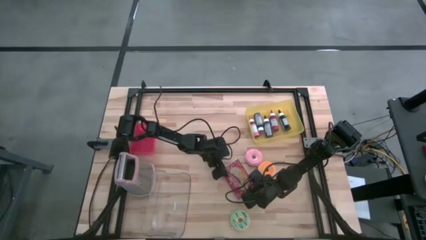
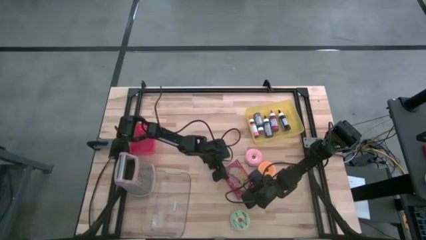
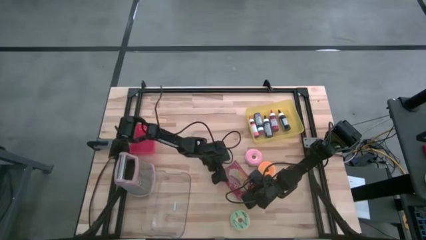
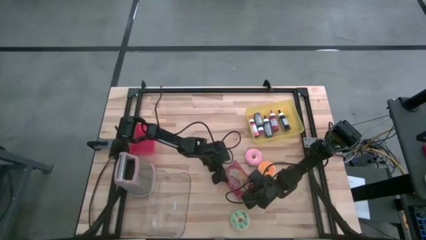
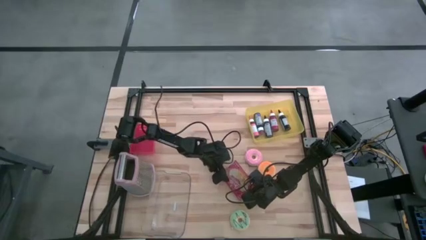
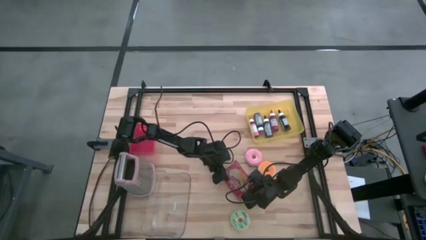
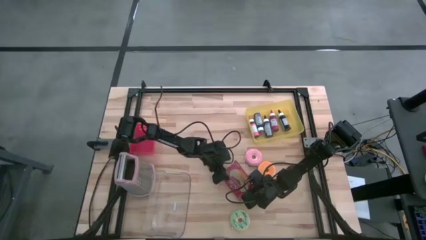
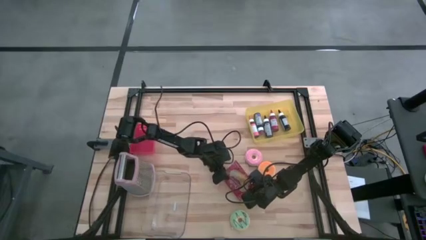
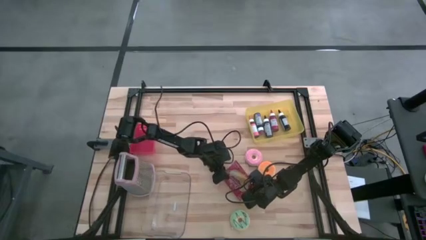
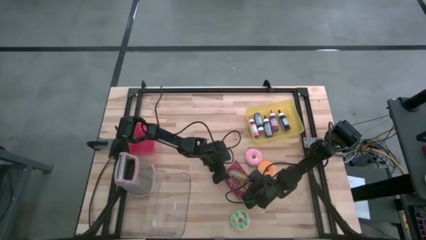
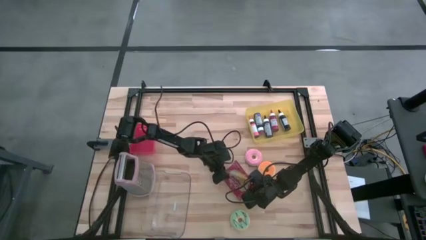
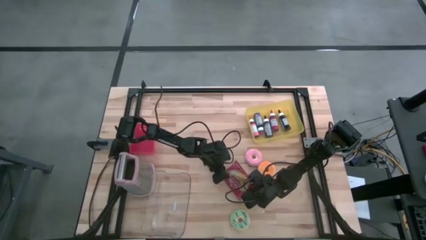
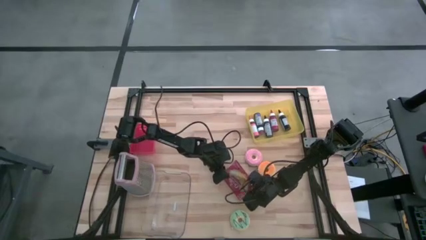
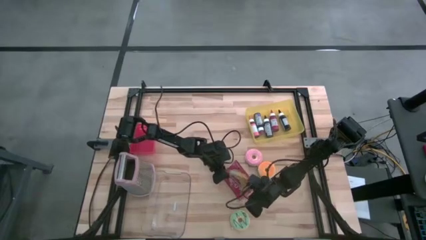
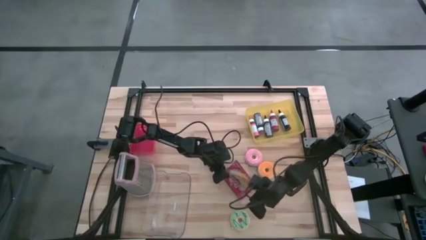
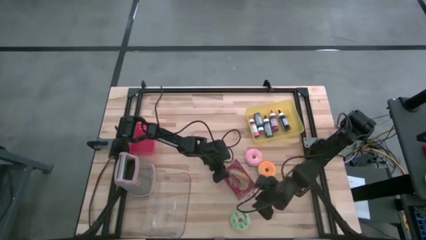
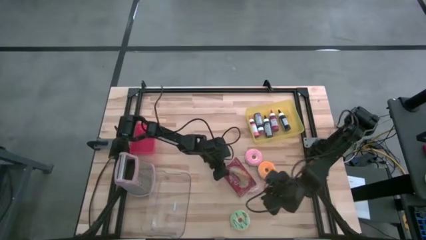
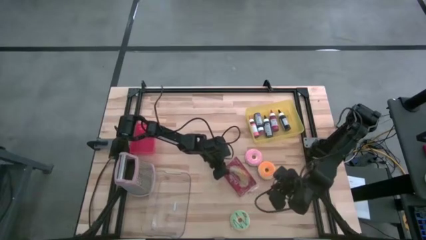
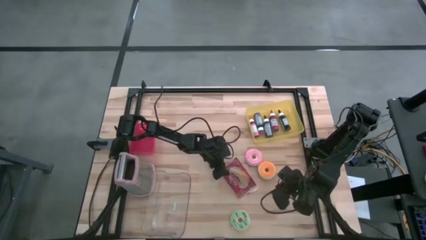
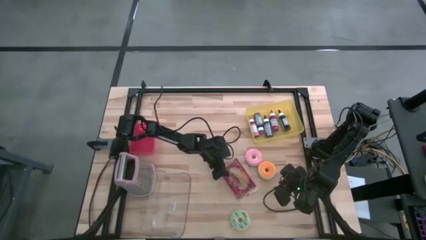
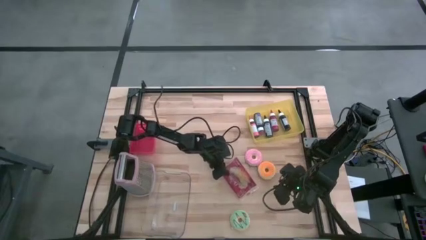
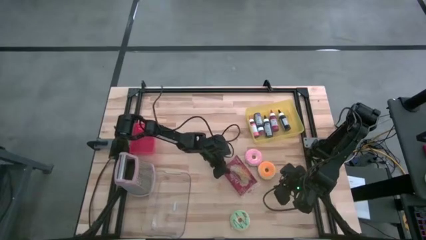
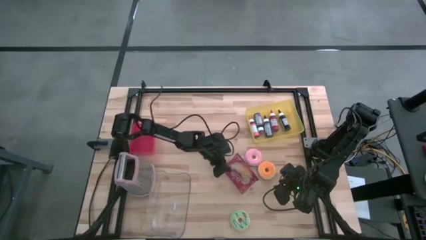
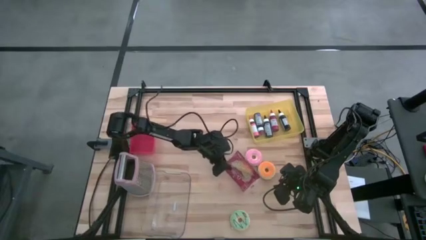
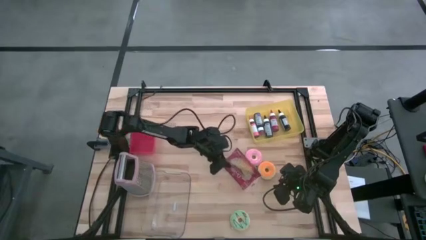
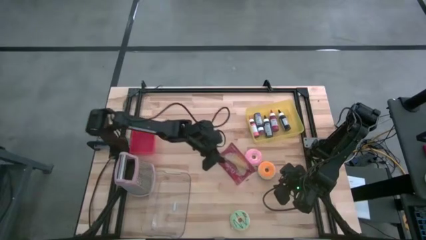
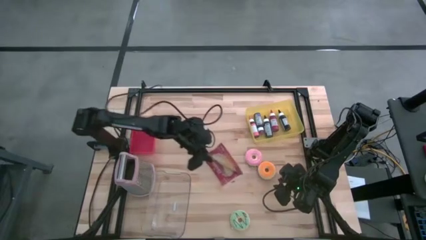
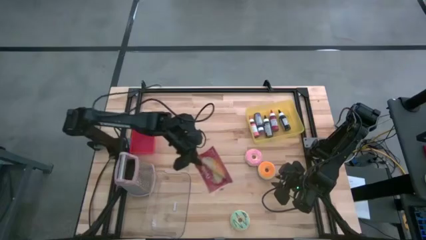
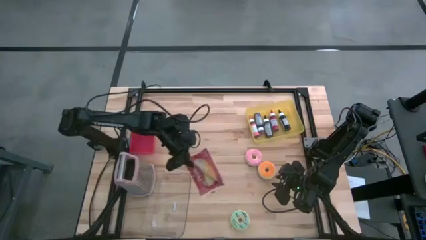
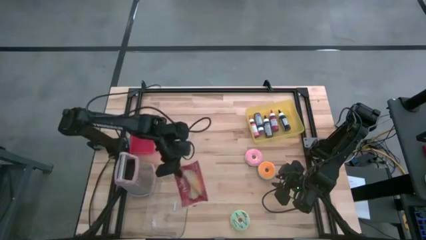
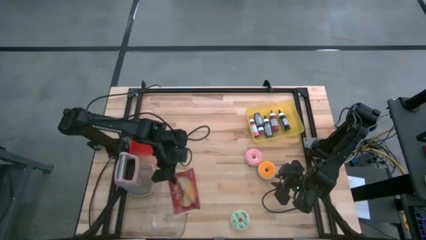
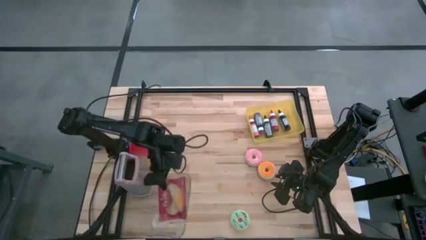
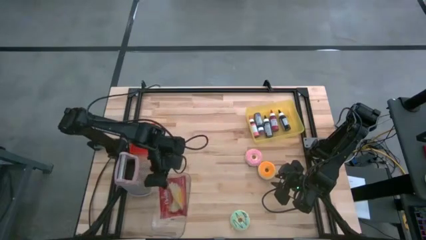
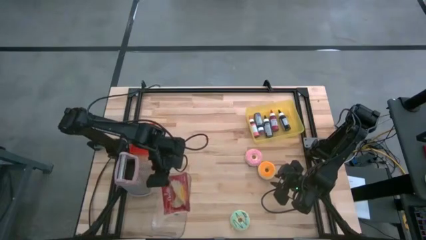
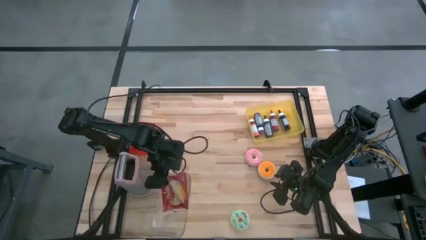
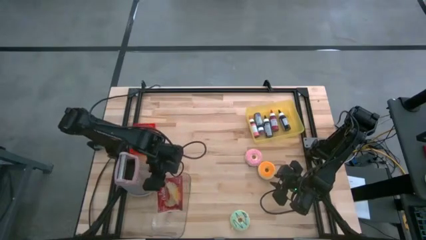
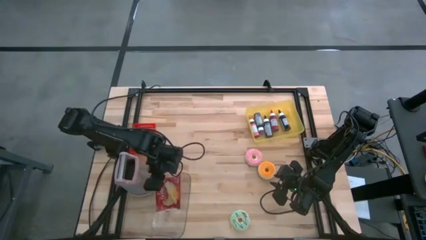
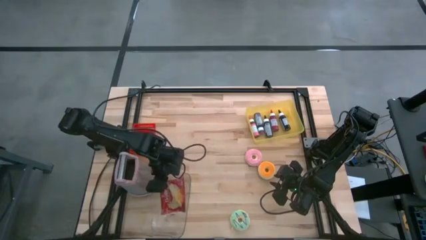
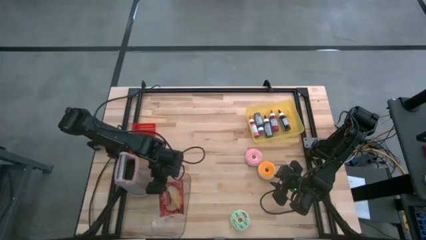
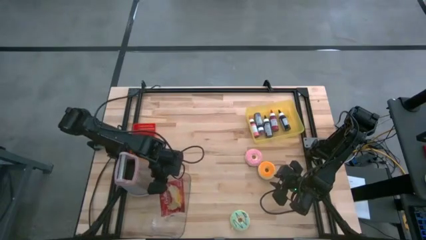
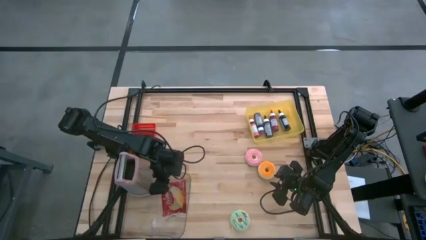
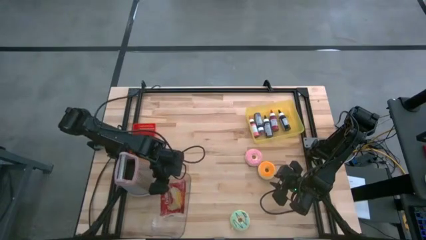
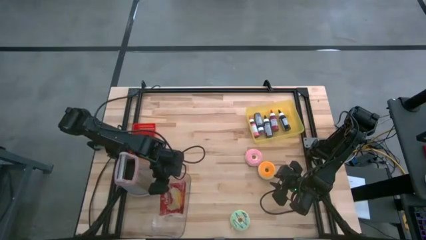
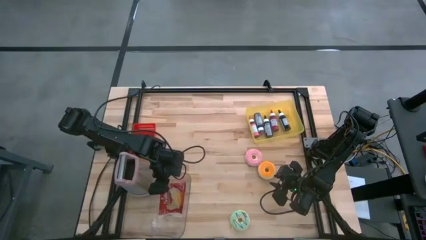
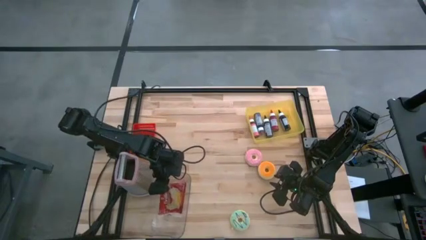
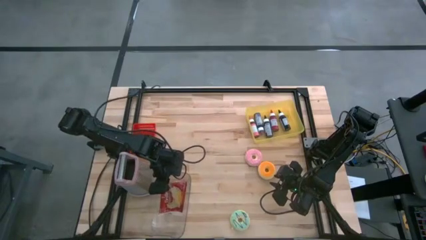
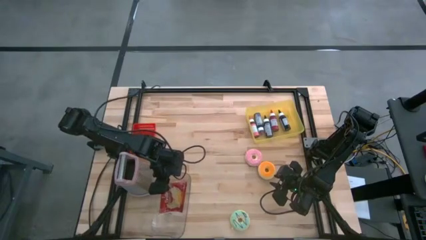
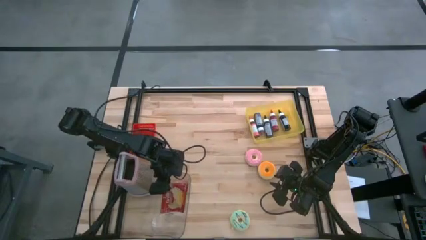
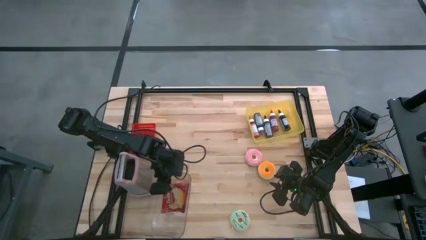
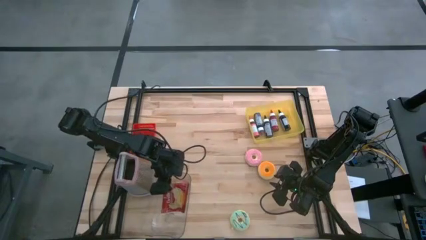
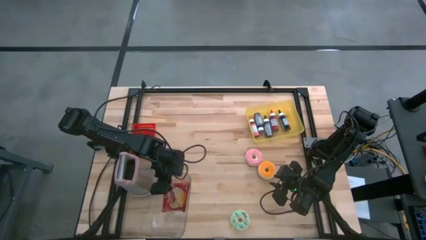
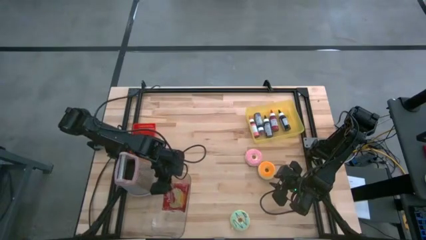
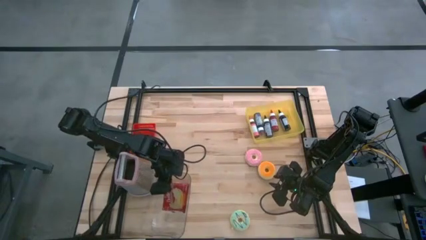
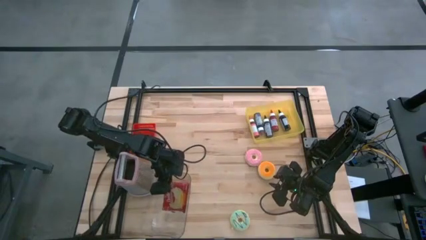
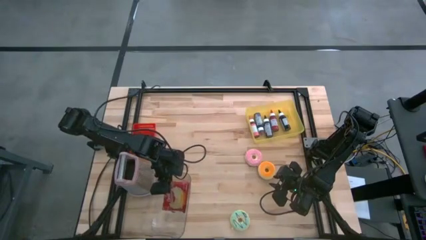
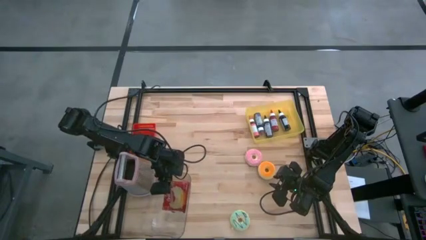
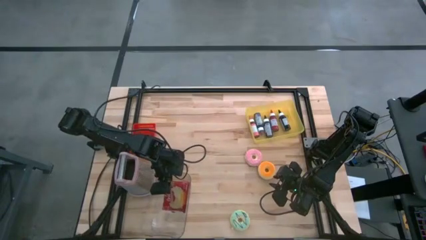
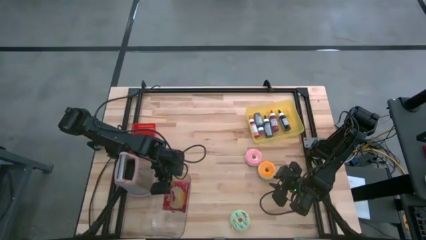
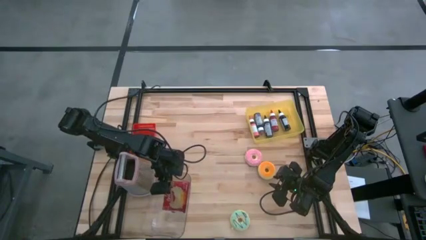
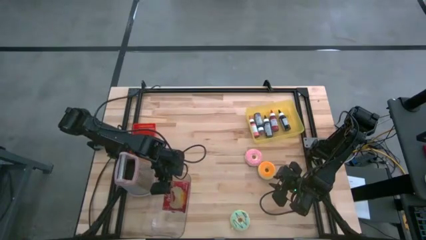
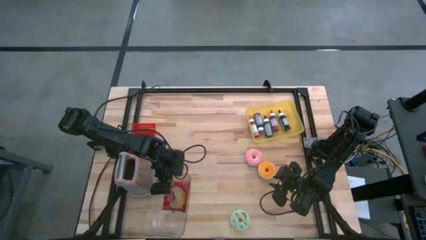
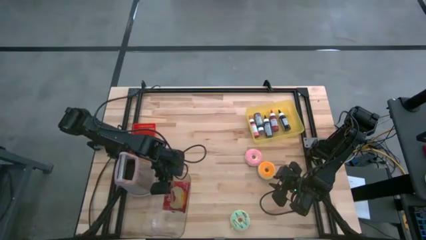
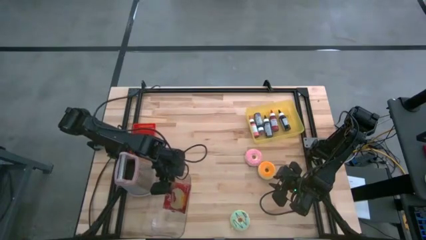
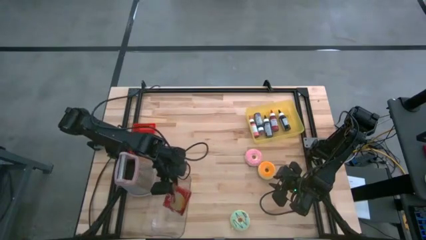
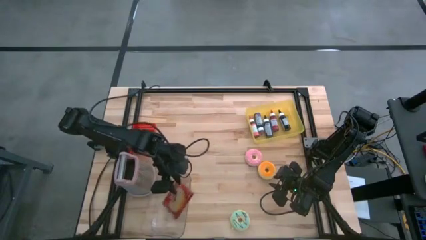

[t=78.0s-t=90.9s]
Task: Pick & Place Food Item
Put the popcorn pack into the transparent bin
